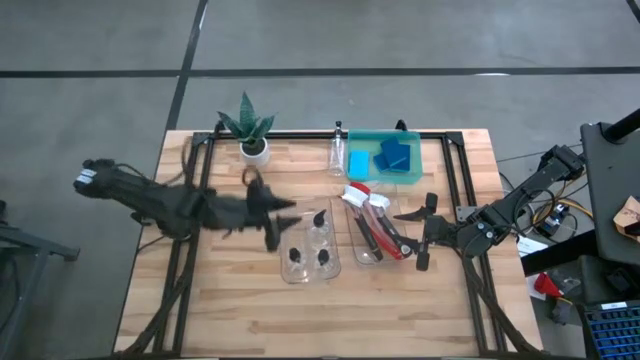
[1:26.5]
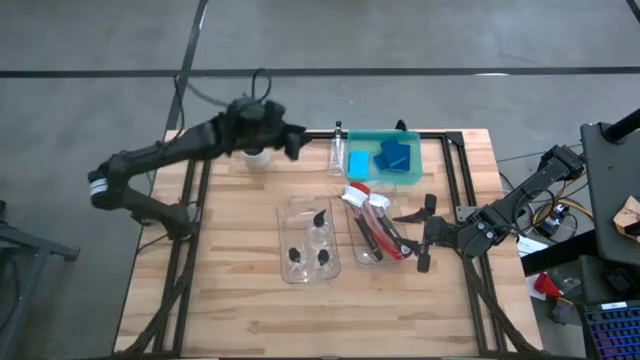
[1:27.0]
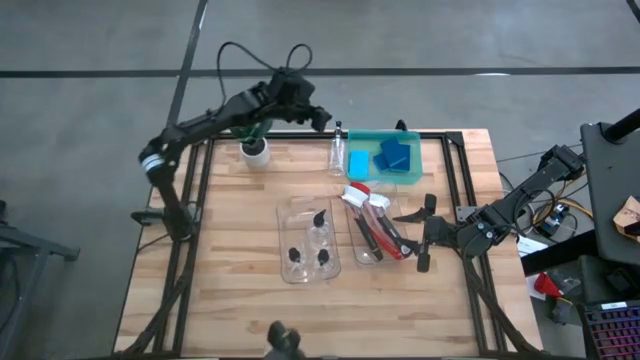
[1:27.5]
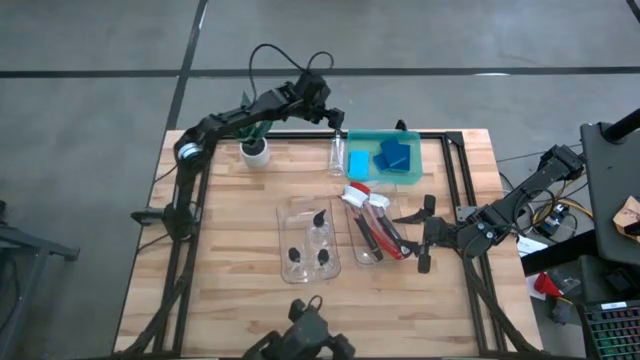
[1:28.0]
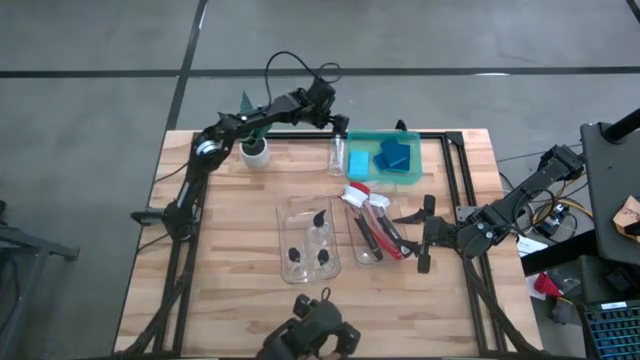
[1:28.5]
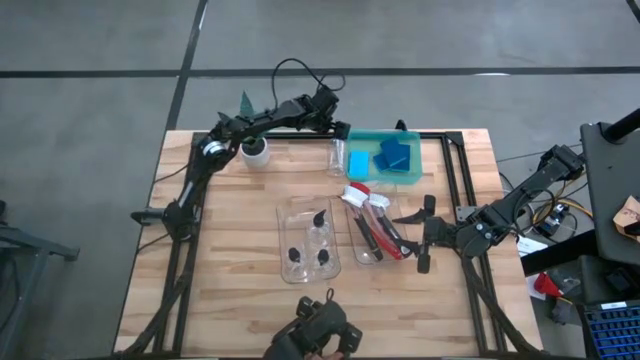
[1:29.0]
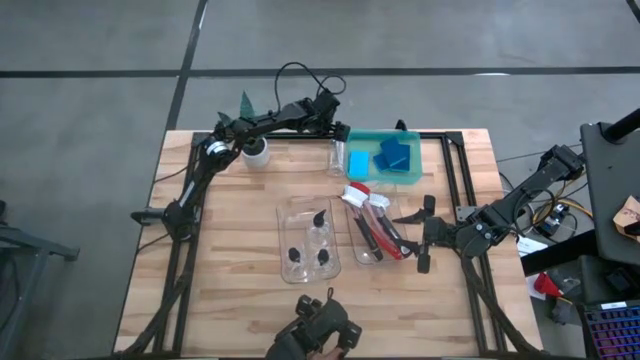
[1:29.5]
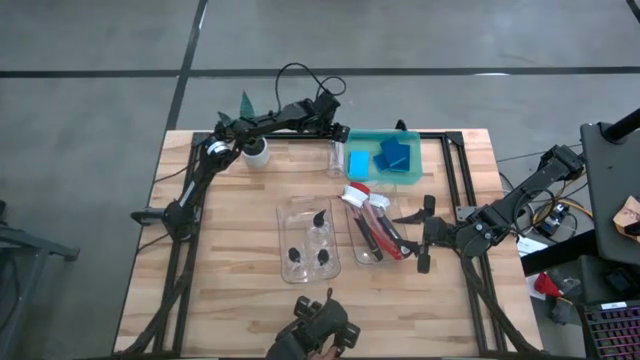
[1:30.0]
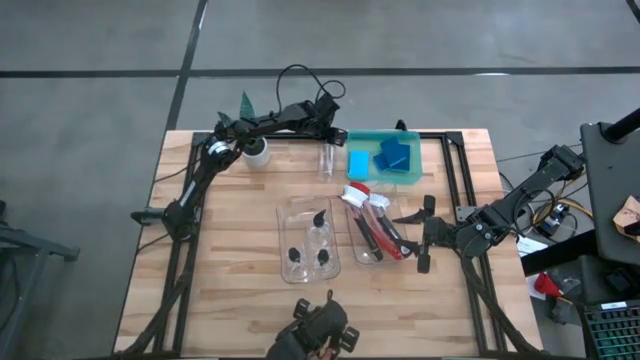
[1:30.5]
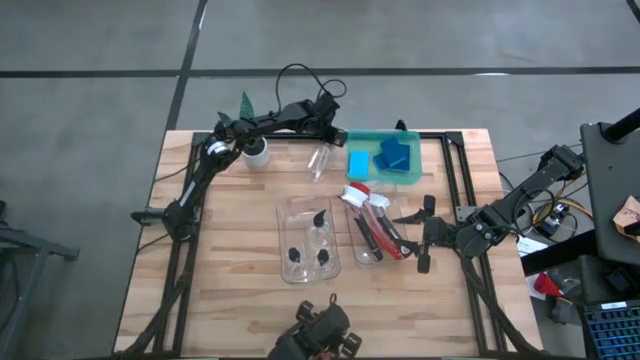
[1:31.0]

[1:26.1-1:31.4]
Task: Pick & Place Kitchen Sink Supplies
Put the transparent soap dispenser into the left transparent bin

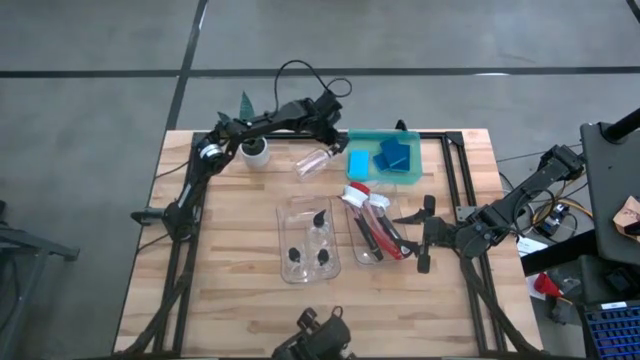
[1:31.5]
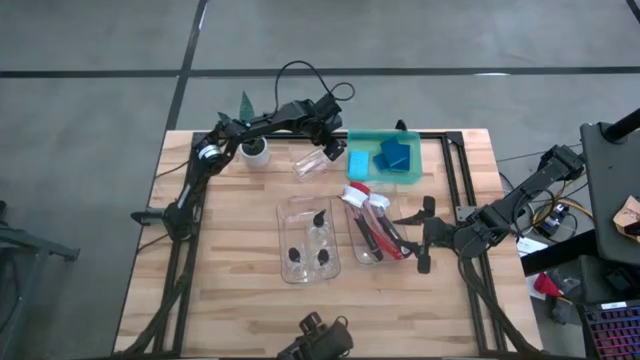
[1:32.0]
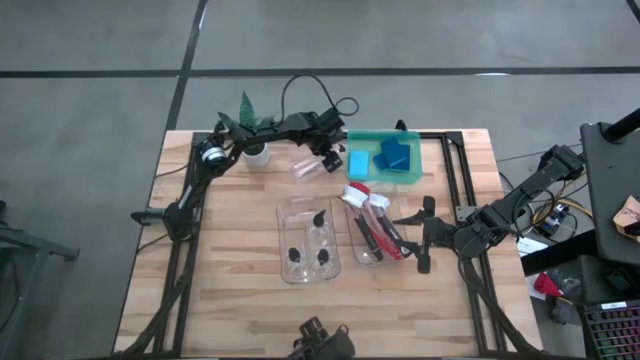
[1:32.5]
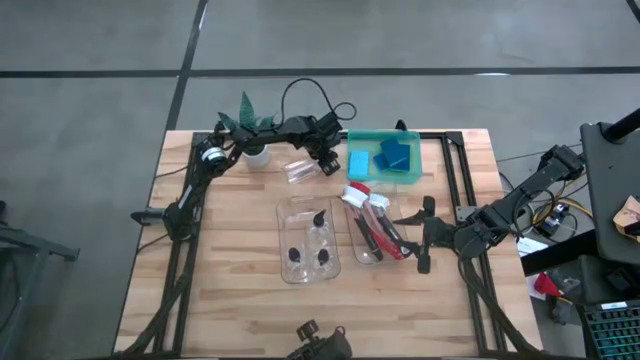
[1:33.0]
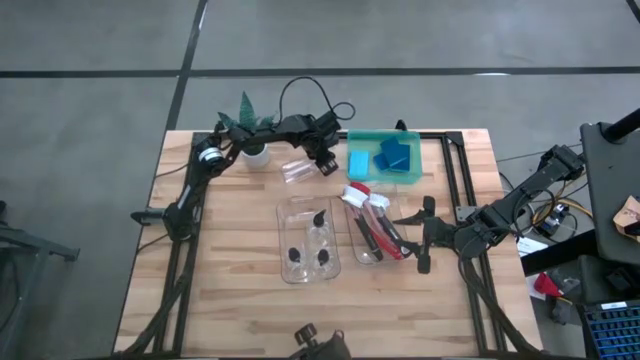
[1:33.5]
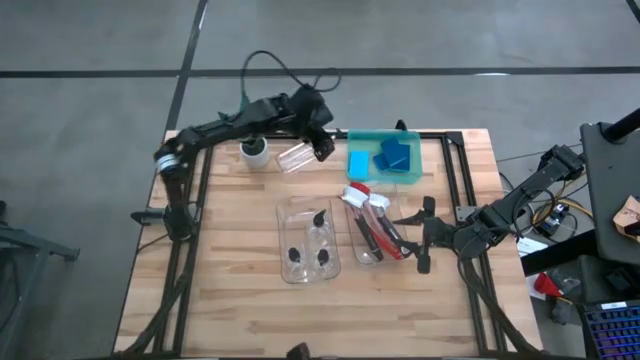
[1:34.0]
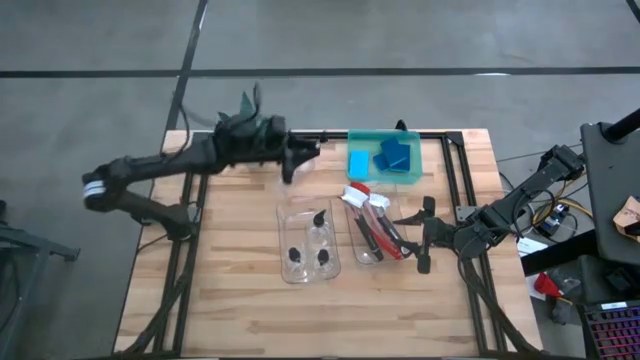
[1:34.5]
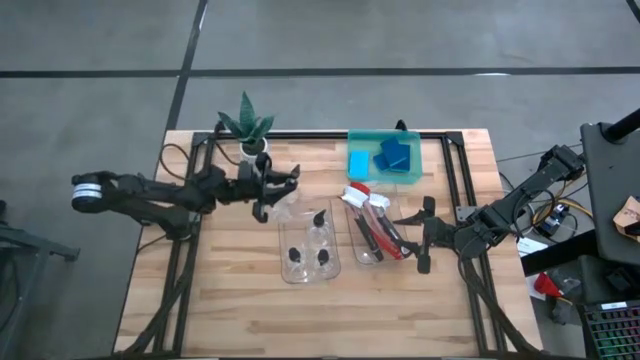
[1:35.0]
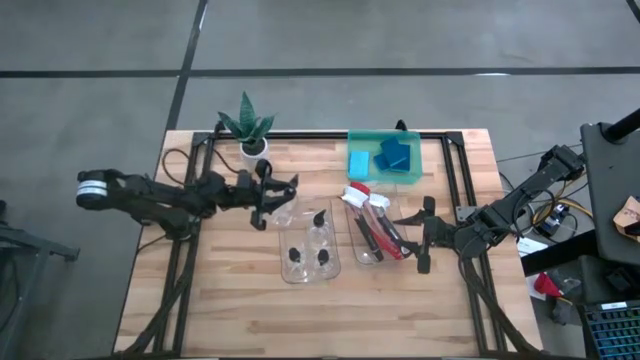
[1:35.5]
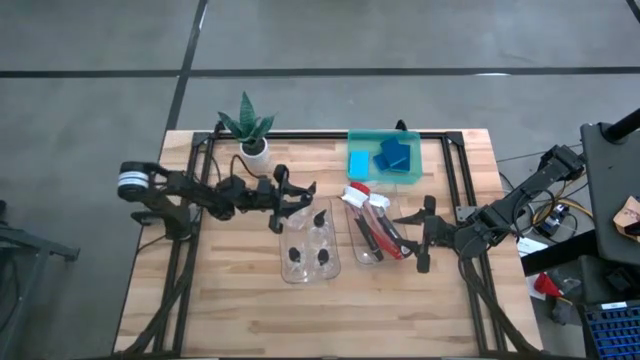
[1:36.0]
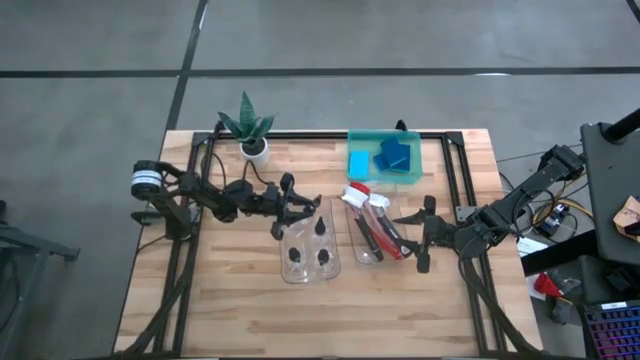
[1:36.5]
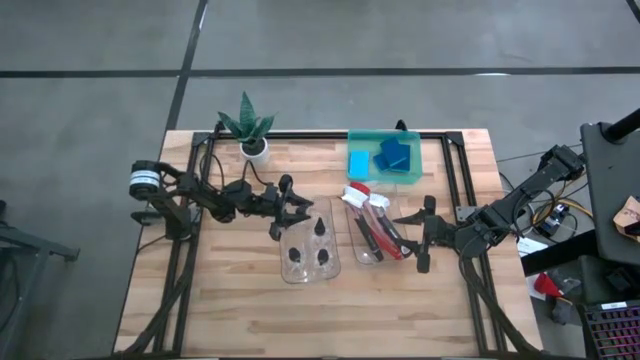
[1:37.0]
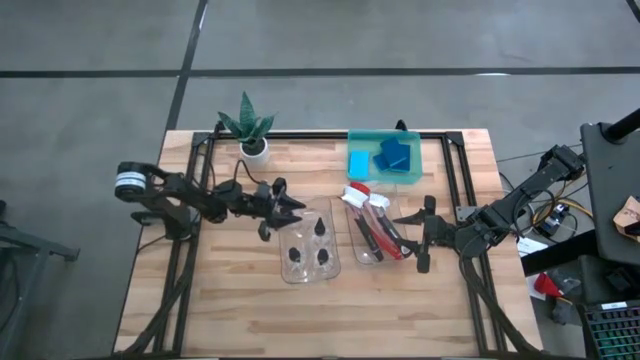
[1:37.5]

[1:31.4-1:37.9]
Put the transparent soap dispenser into the left transparent bin

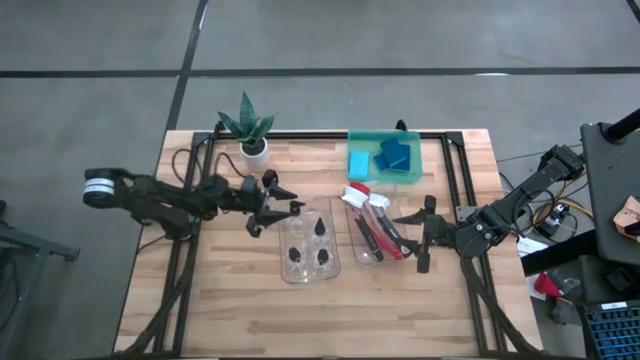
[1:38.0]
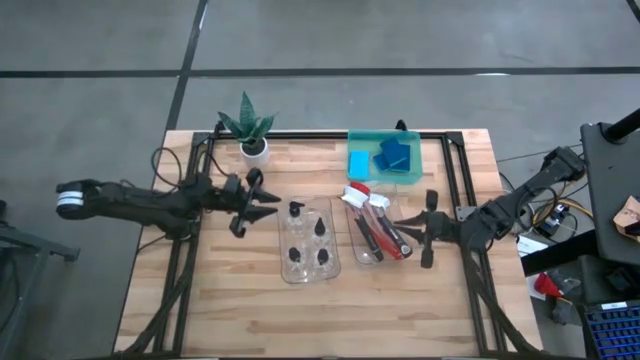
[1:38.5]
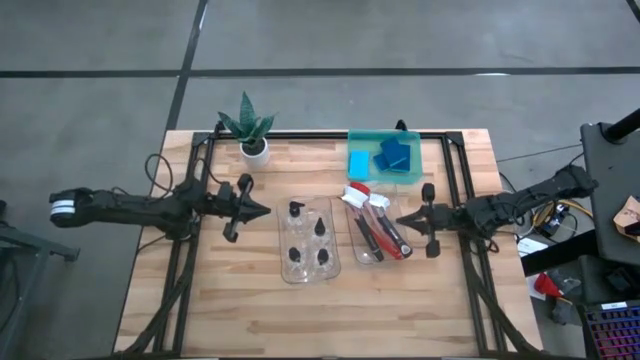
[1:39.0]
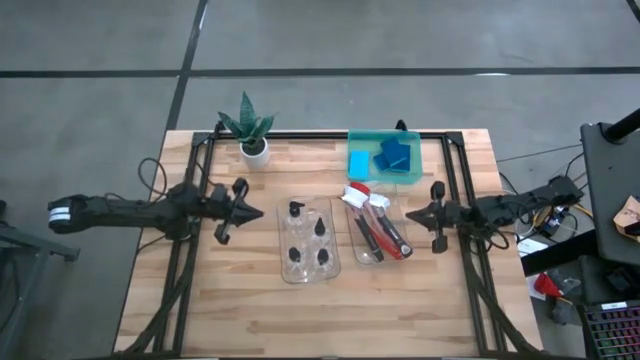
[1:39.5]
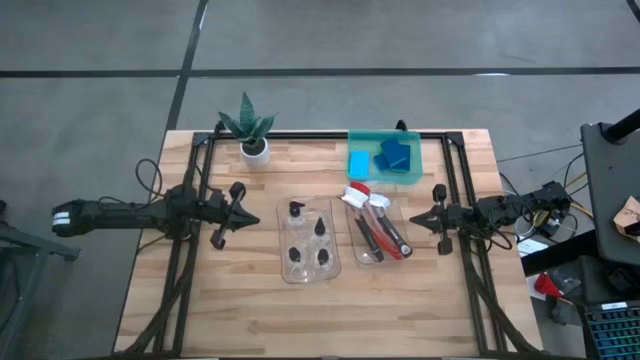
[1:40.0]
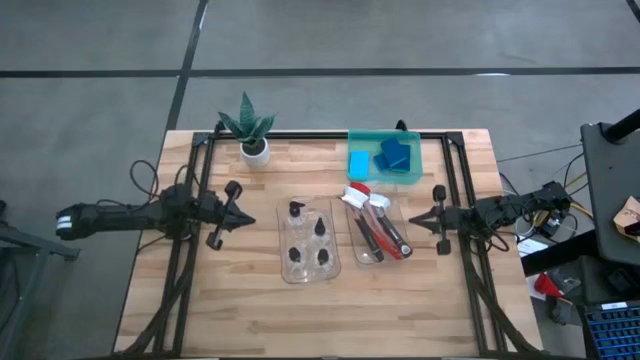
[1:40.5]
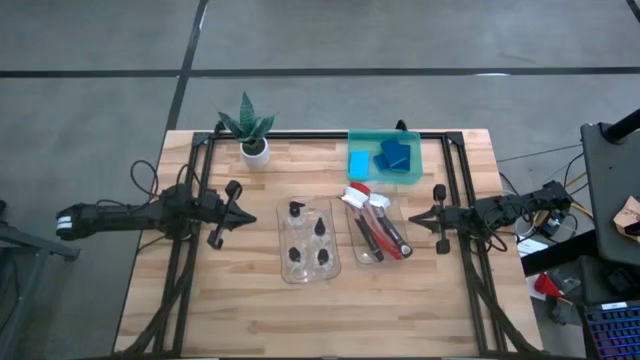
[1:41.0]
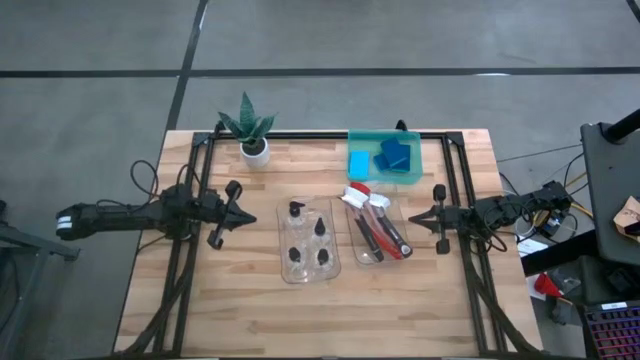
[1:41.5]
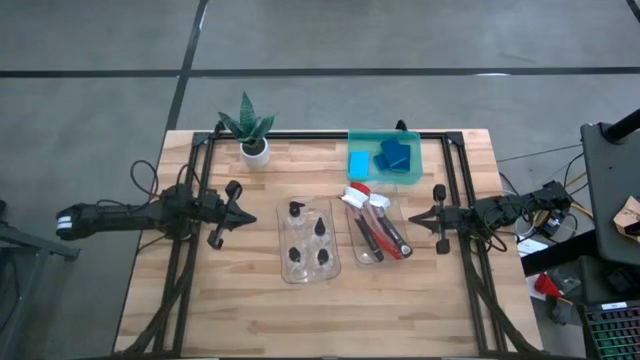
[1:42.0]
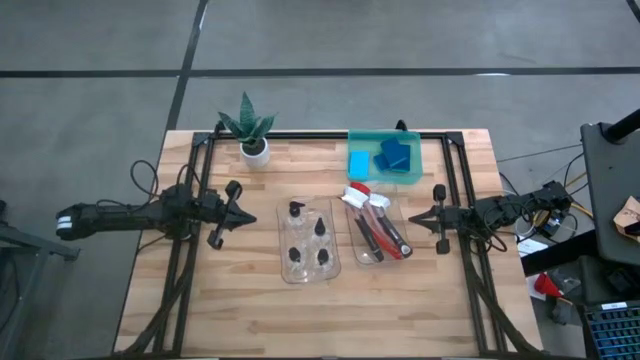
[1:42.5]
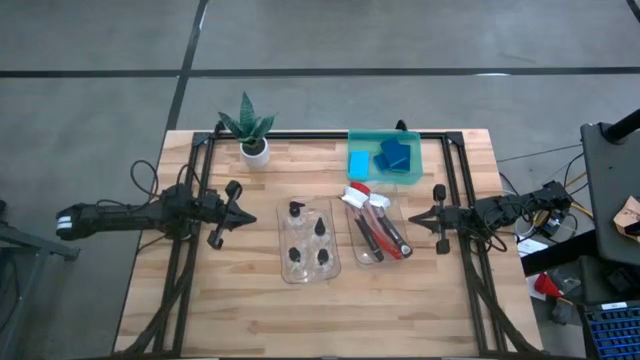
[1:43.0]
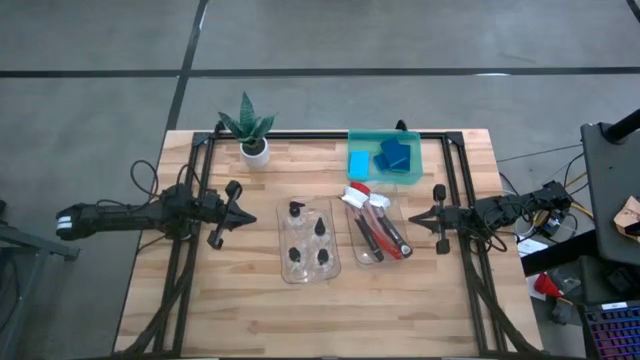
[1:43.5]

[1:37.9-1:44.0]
Return to Home Position

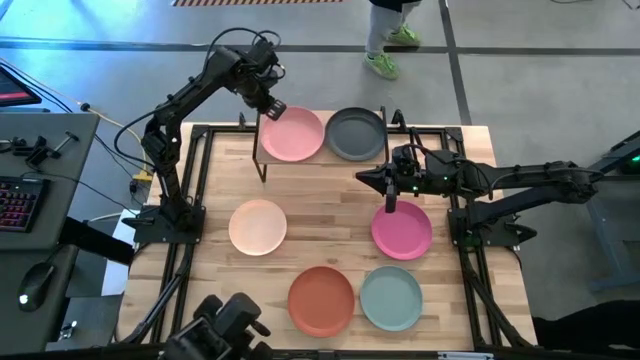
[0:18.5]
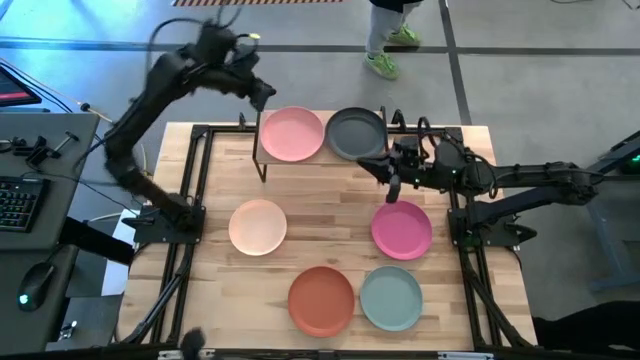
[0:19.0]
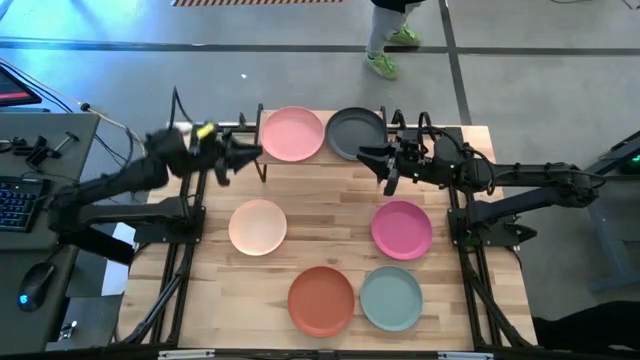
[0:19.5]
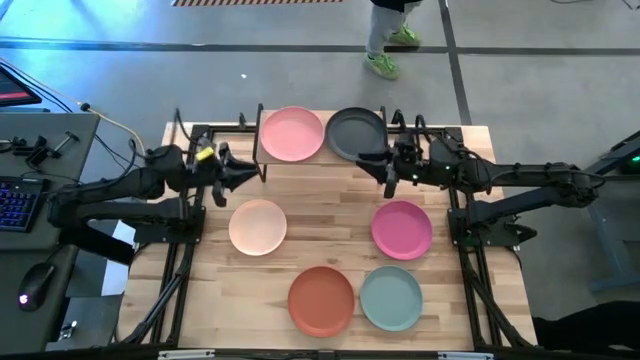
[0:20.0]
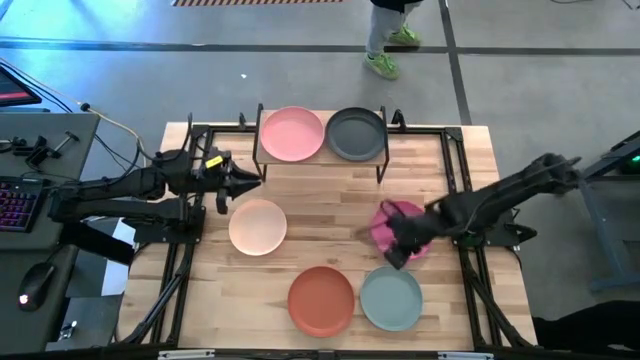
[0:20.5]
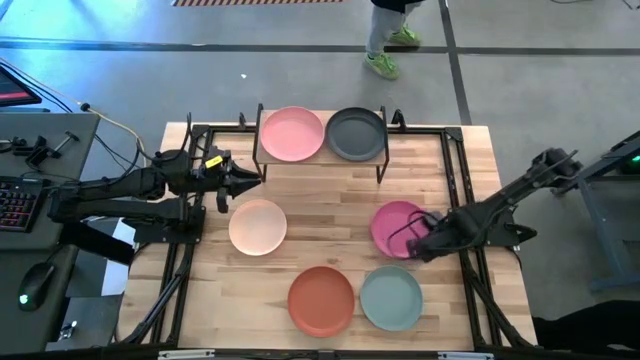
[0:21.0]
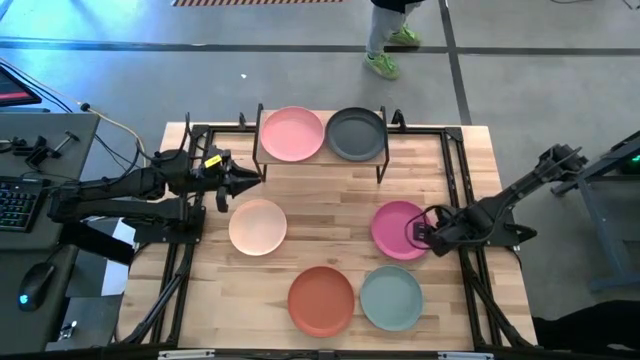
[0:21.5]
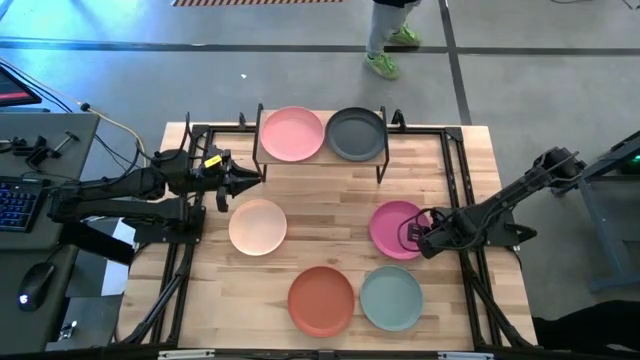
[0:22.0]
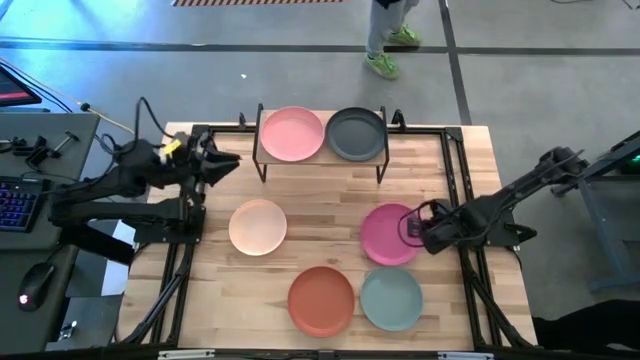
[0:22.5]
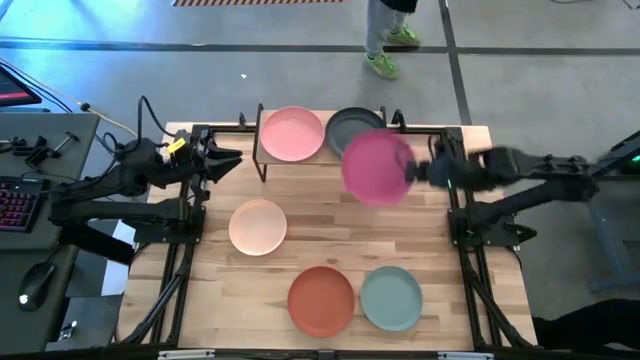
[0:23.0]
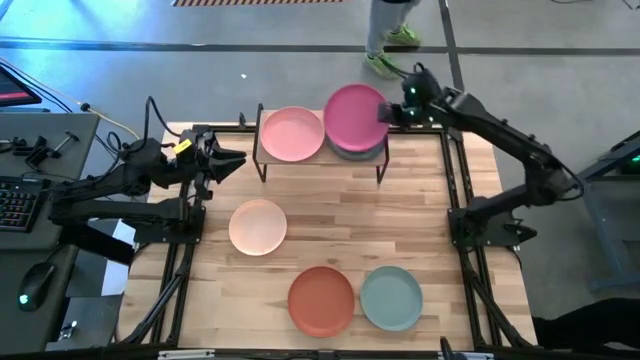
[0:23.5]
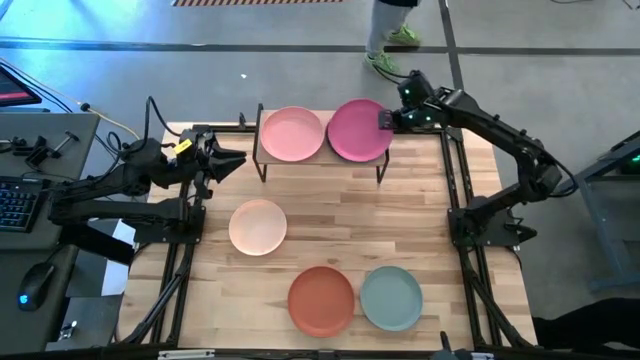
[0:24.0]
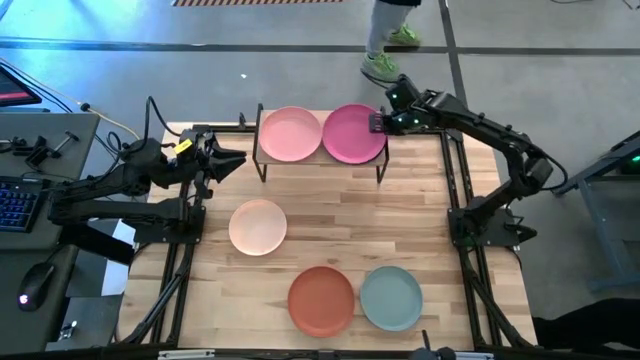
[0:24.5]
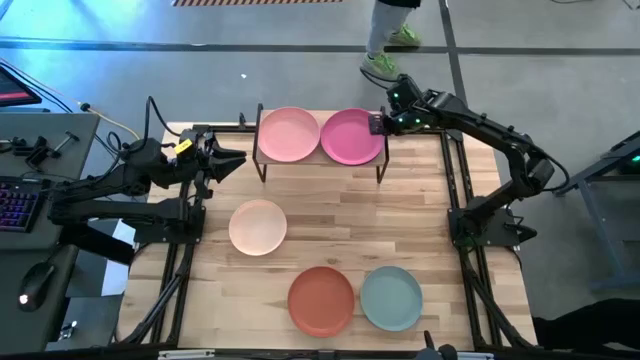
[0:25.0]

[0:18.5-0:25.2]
Task: Place and stack plates onto a shelf
Stack the pink plate on top of the black plate on the shelf
